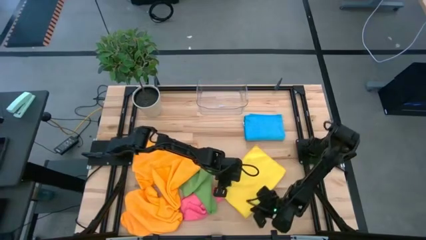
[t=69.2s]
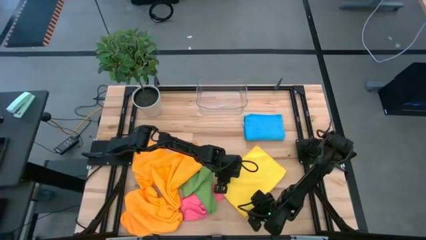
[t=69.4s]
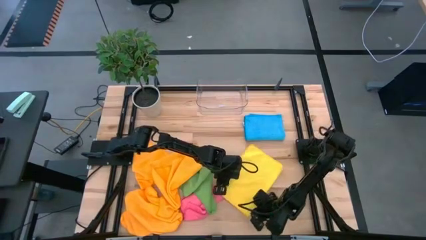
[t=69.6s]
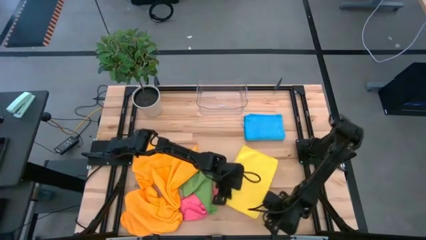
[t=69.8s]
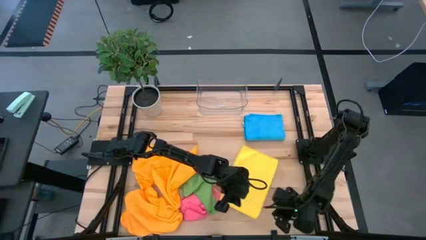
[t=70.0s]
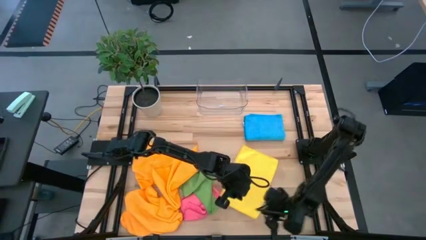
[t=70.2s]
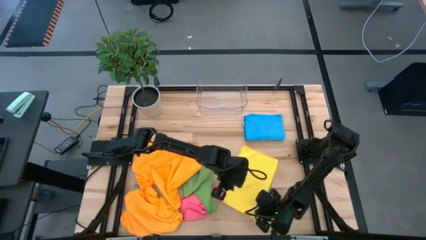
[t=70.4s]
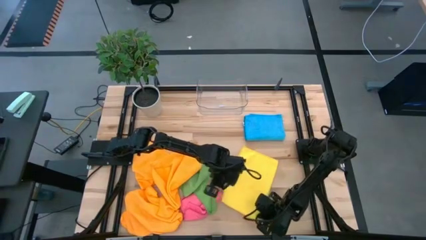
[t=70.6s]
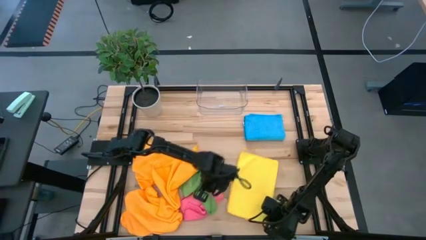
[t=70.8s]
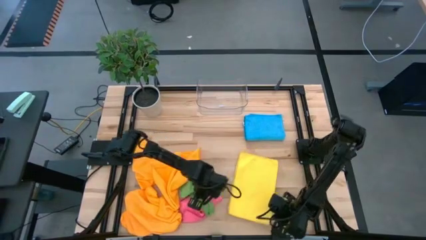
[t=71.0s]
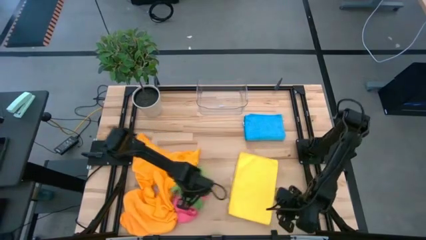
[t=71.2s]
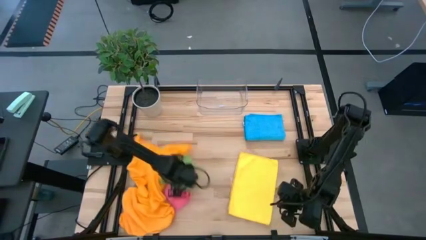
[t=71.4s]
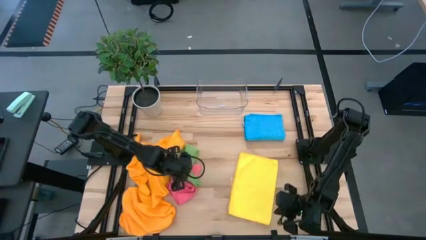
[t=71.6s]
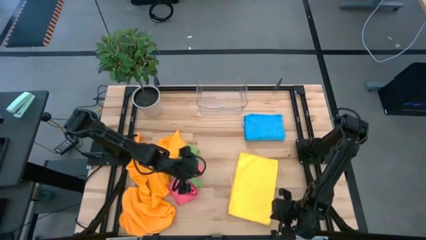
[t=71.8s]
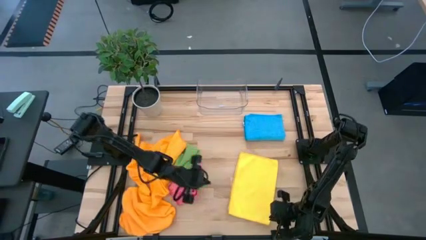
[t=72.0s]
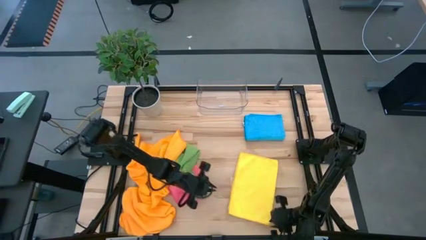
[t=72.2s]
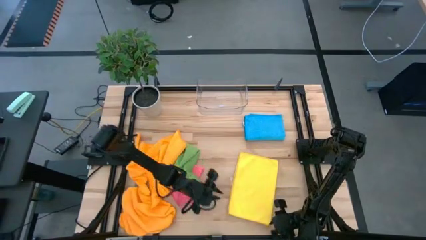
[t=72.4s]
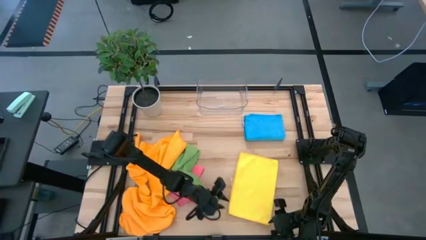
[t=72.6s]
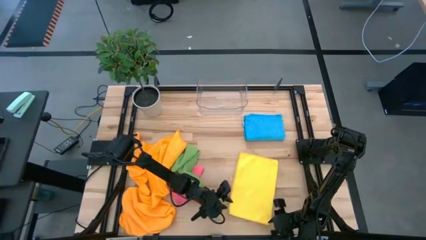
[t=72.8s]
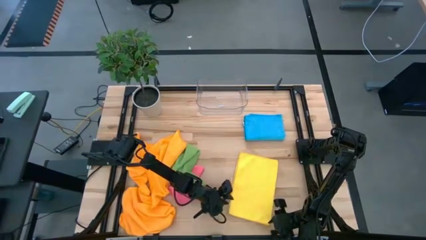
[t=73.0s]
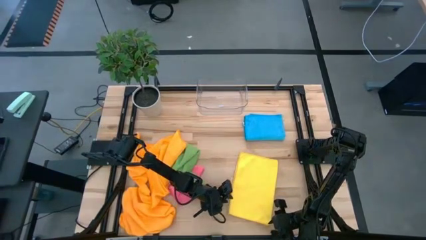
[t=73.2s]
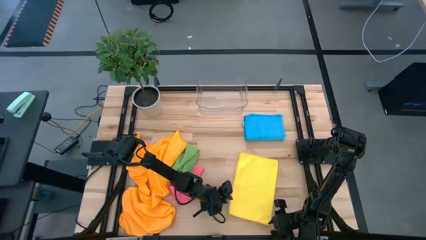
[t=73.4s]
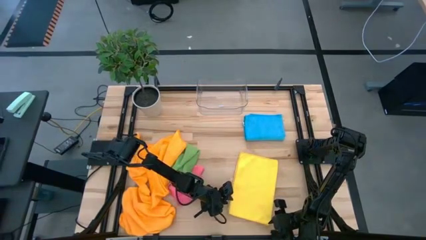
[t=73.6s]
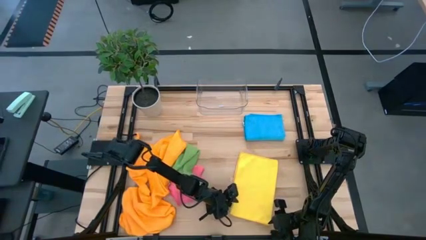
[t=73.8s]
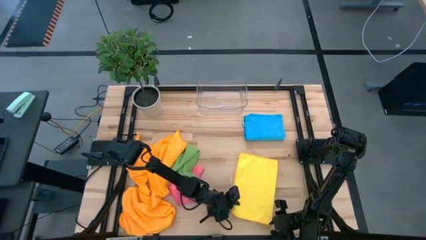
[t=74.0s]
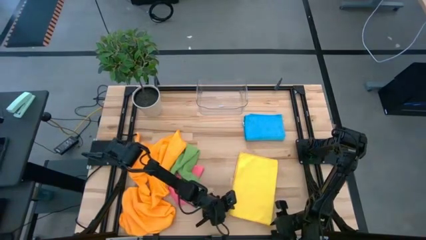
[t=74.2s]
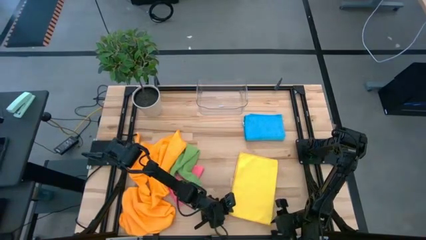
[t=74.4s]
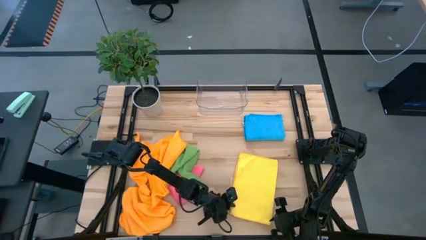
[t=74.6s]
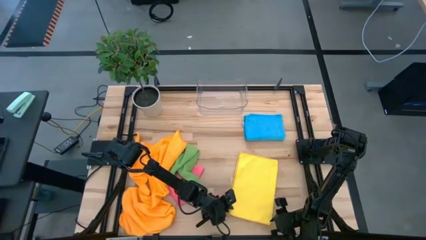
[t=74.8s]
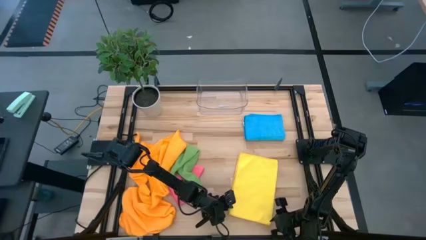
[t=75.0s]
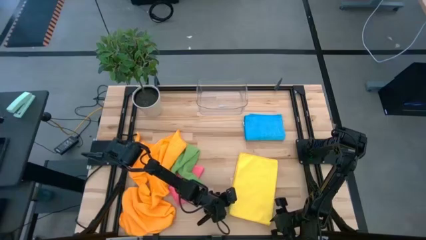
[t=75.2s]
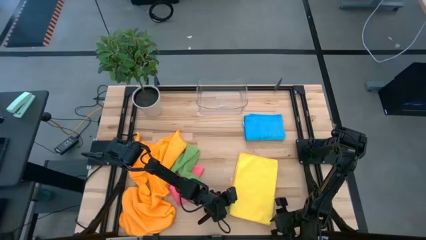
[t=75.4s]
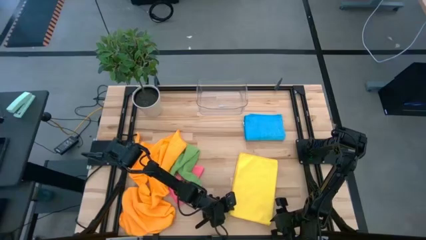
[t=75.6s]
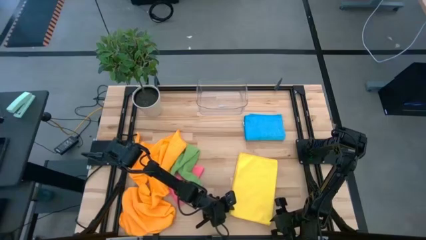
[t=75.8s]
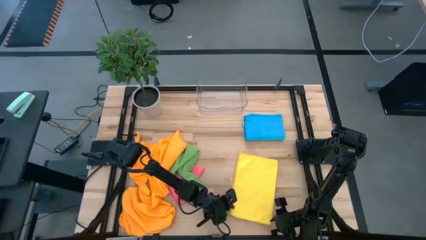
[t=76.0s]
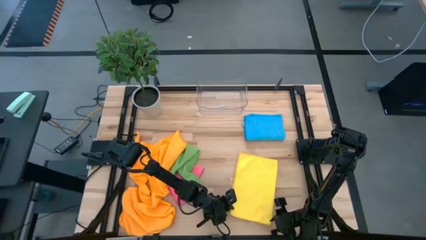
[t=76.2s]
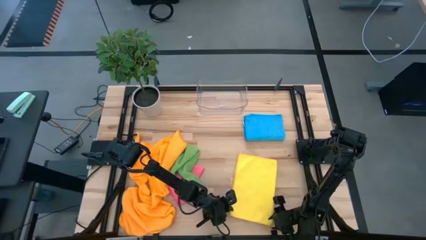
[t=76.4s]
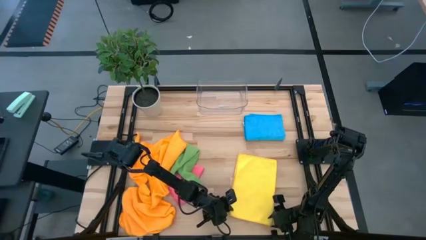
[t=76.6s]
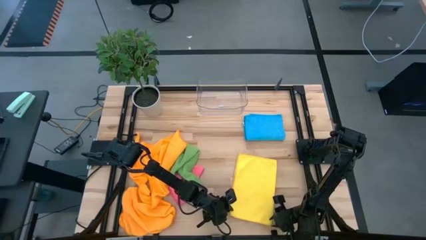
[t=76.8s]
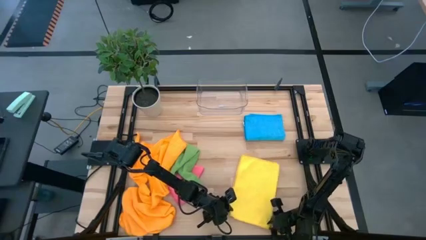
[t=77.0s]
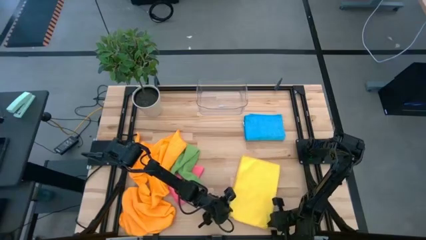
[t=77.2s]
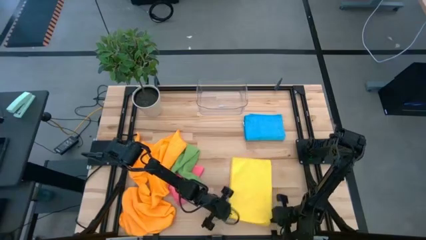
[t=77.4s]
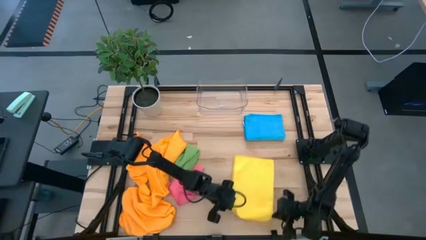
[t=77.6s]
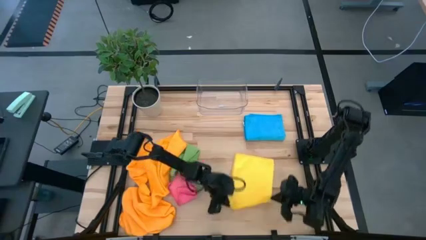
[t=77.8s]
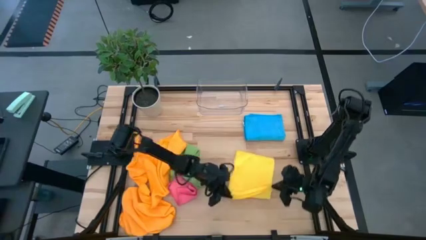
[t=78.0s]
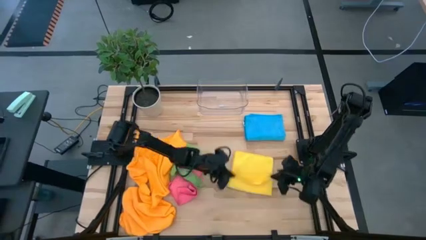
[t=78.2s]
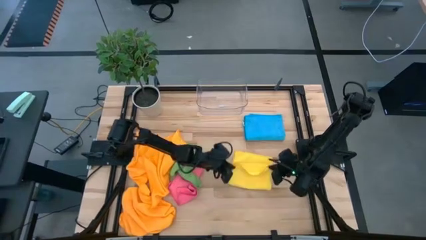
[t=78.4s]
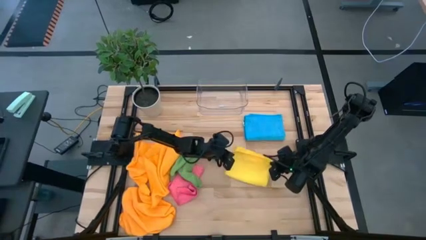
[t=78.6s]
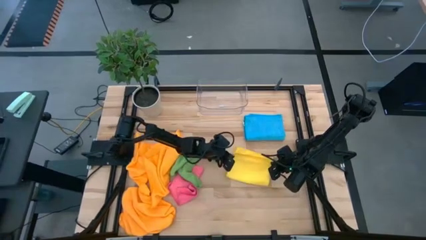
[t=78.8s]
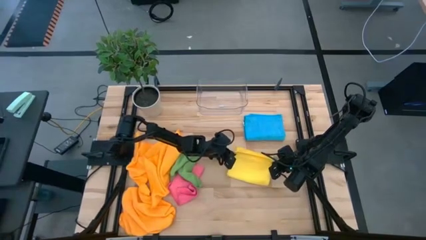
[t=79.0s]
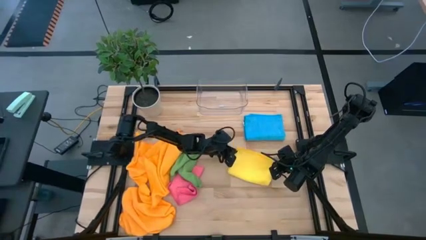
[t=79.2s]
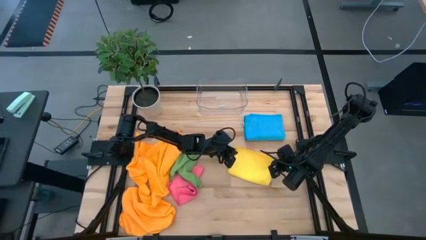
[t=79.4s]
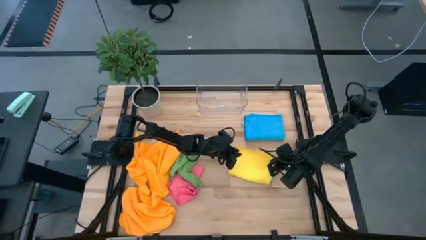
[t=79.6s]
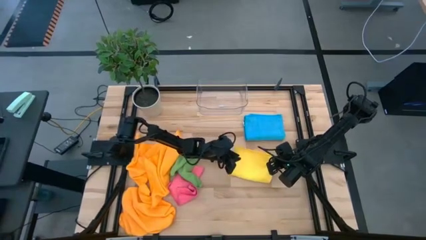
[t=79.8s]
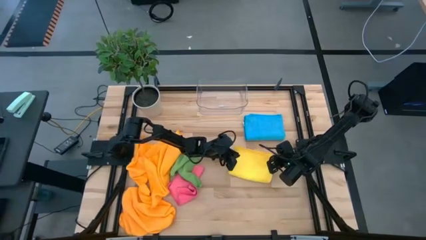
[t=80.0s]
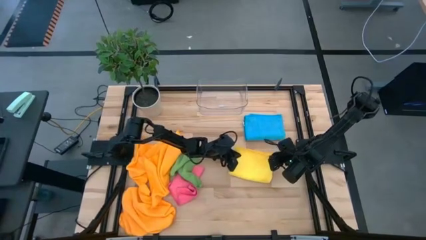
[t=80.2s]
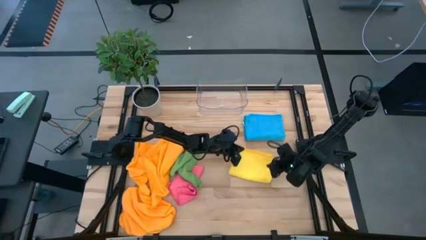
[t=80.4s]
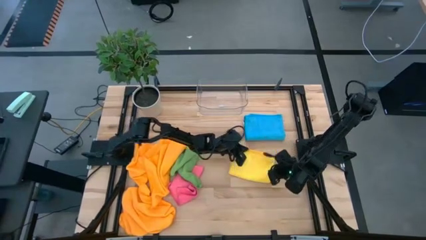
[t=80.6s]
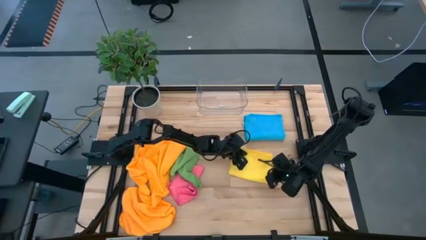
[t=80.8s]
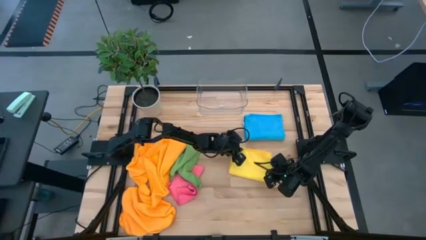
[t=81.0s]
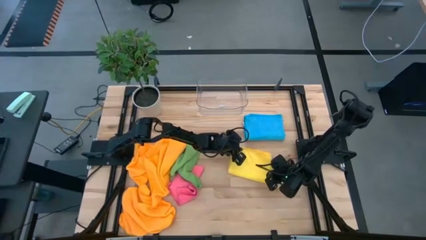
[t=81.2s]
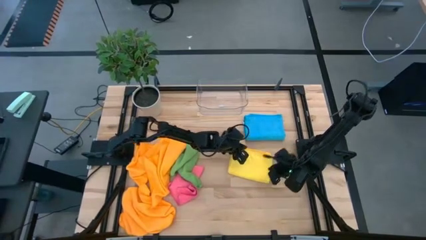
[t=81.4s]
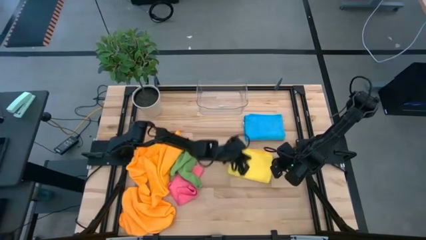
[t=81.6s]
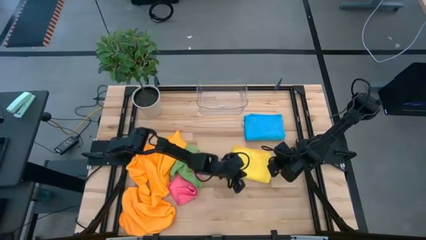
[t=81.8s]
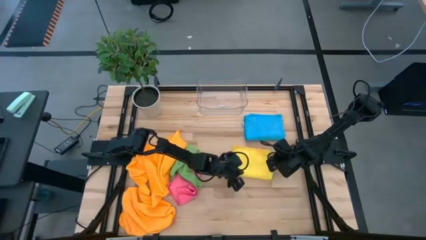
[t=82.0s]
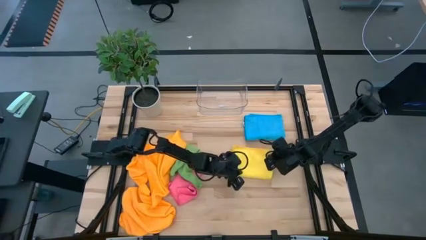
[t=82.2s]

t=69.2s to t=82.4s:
Task: Fold microfiber towels
Fold the yellow towel

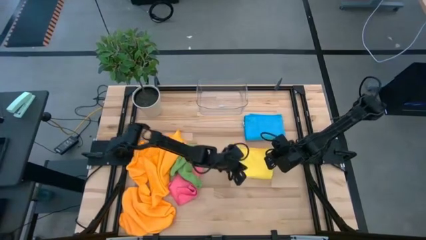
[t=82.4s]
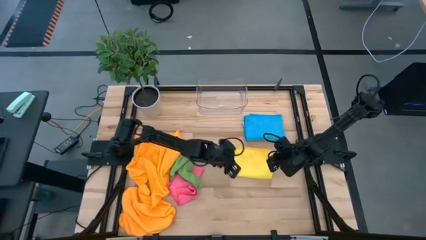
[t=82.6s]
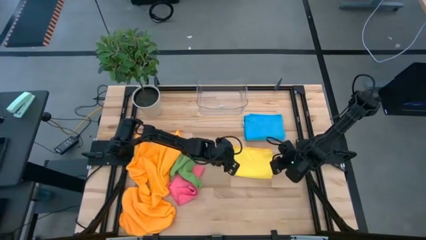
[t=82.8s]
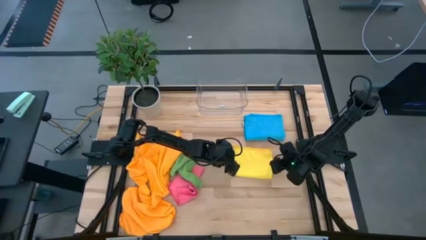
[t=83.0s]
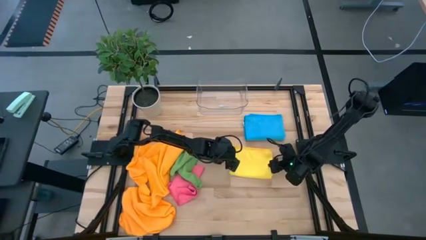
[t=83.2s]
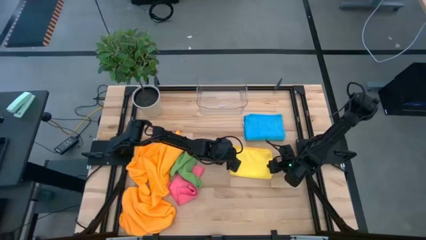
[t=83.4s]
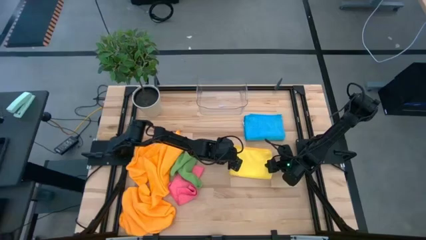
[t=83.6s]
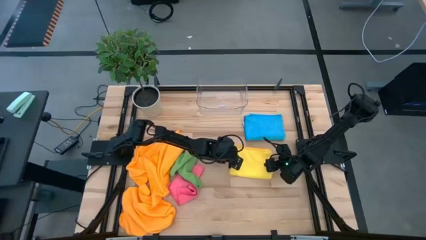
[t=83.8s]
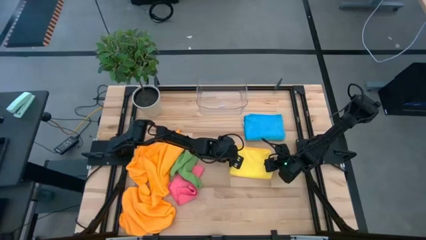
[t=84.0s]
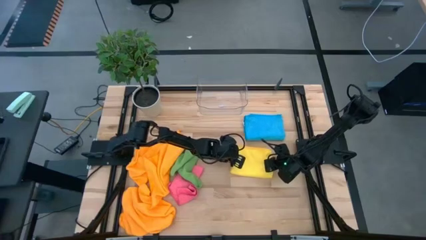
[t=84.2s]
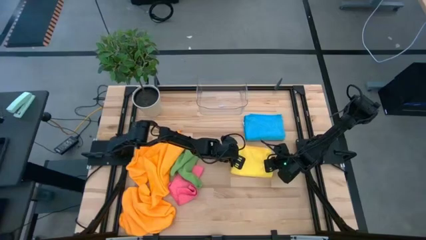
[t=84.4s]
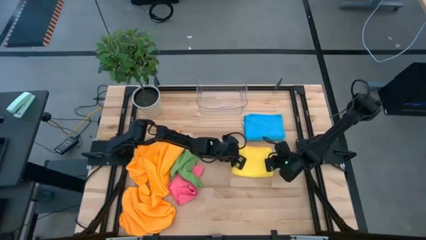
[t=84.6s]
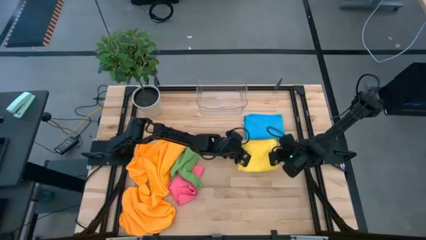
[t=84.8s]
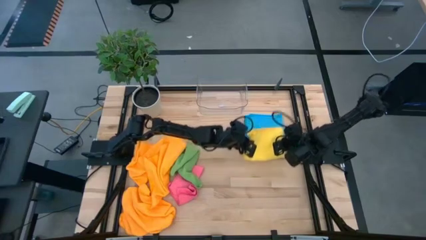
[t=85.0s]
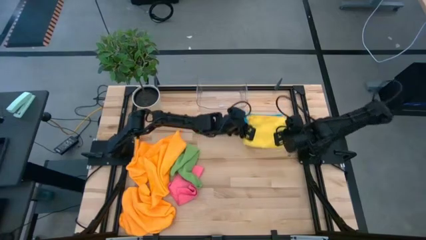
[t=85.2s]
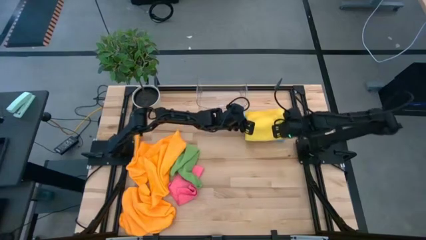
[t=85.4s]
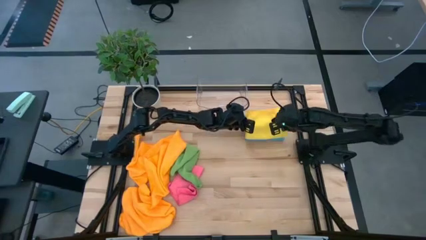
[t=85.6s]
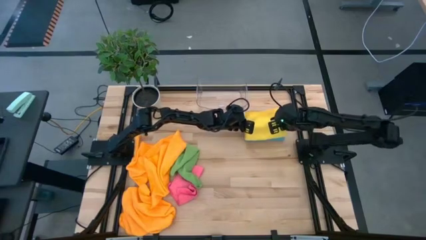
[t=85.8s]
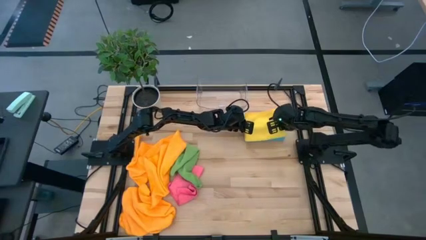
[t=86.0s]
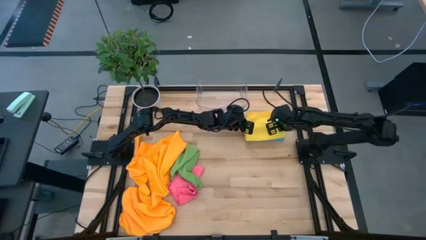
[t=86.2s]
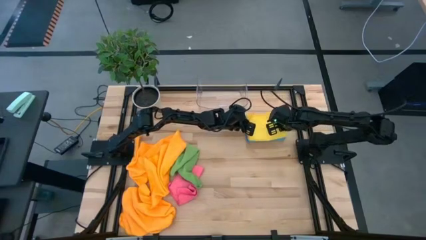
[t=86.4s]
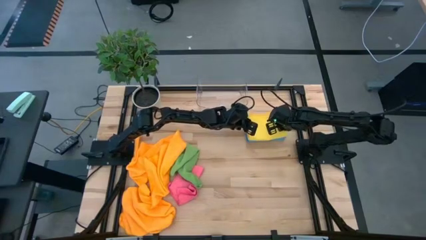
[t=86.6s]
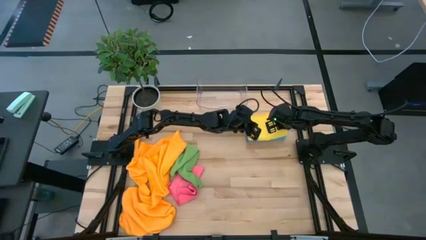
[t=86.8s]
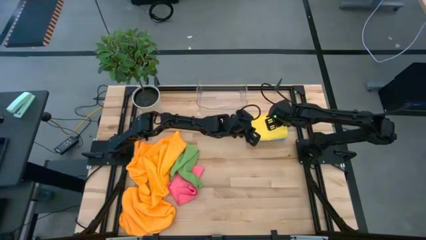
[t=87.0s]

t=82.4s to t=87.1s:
Stack the yellow towel on the top of the blue towel
